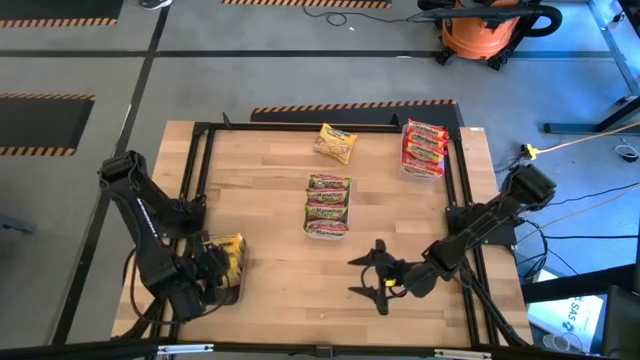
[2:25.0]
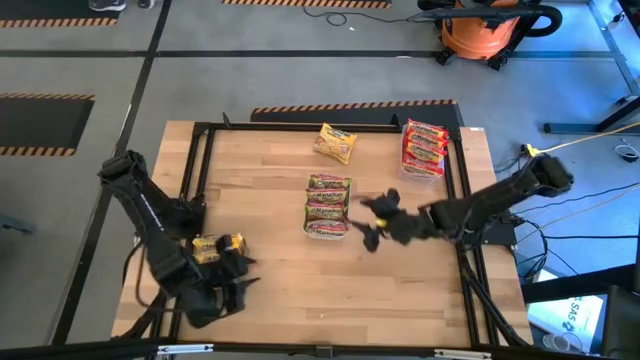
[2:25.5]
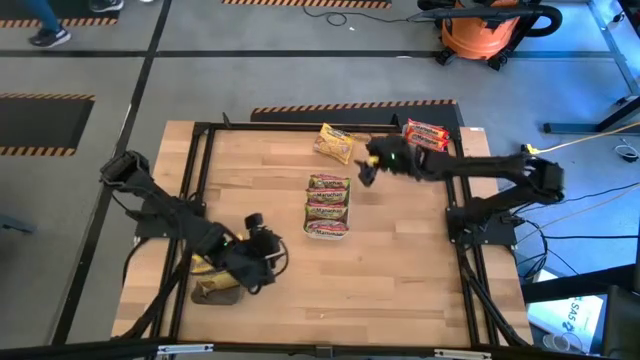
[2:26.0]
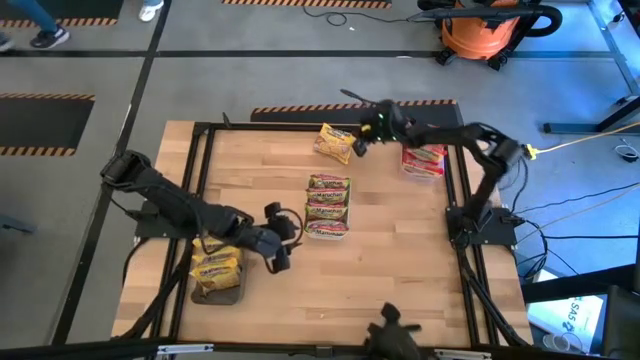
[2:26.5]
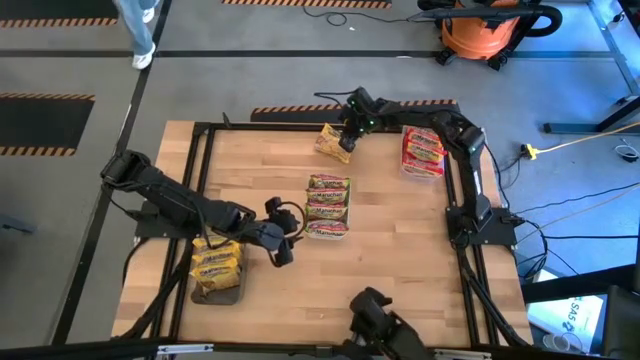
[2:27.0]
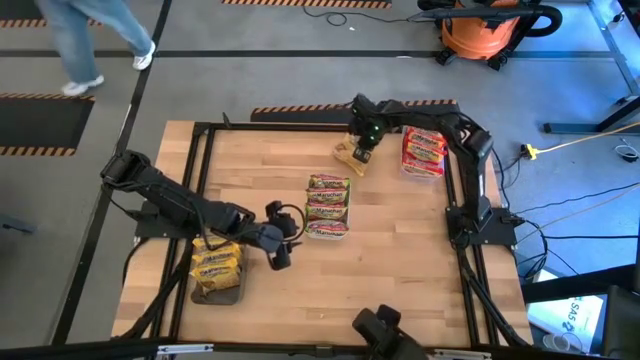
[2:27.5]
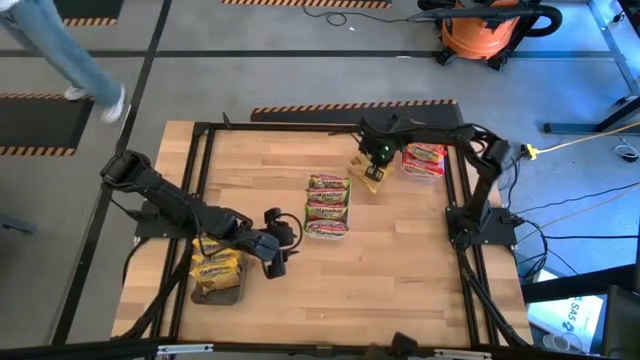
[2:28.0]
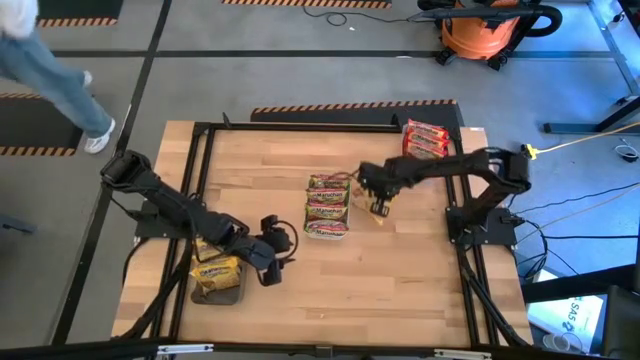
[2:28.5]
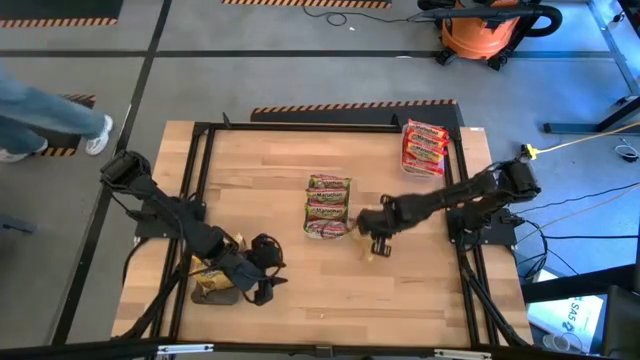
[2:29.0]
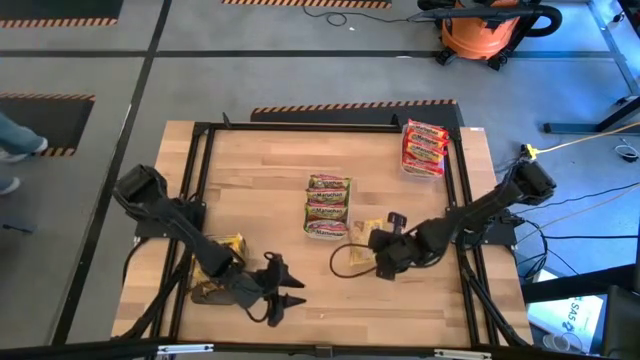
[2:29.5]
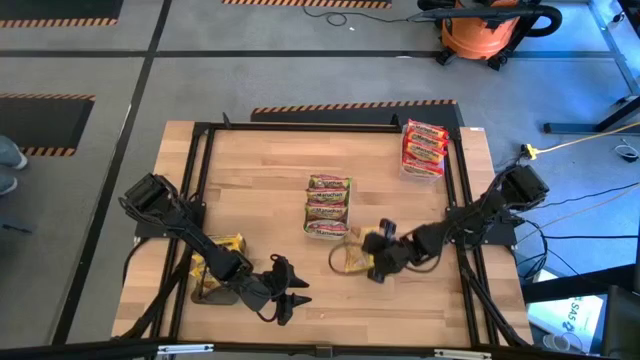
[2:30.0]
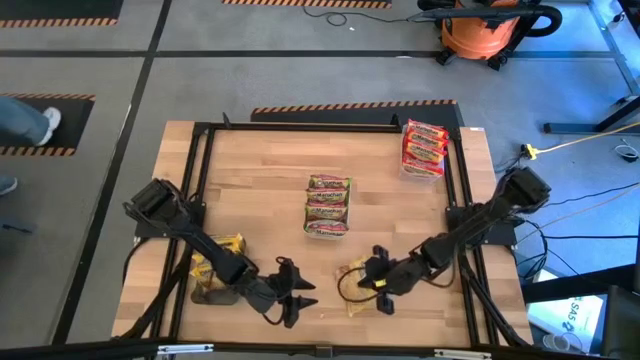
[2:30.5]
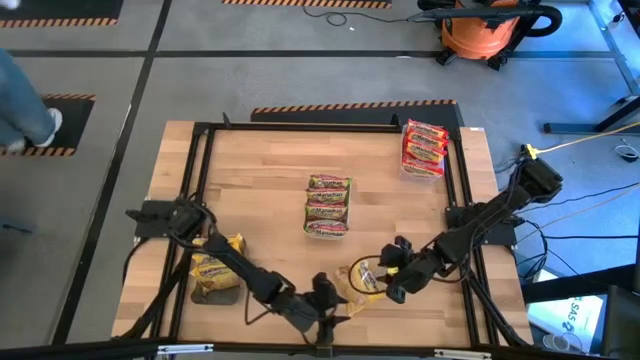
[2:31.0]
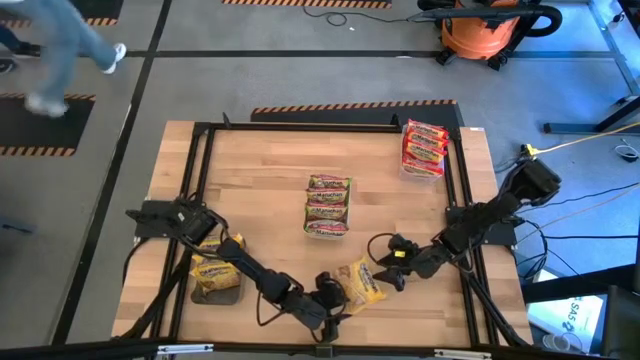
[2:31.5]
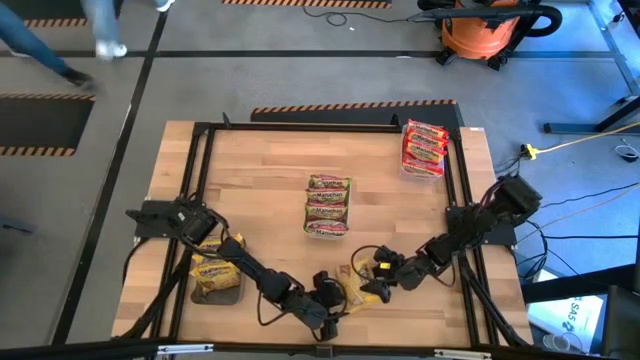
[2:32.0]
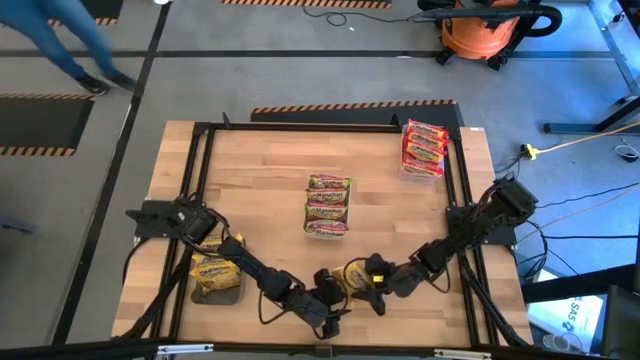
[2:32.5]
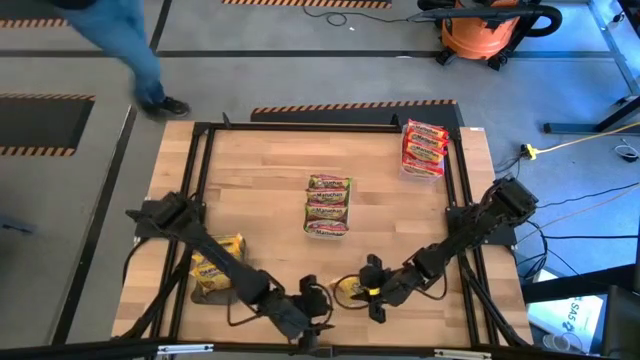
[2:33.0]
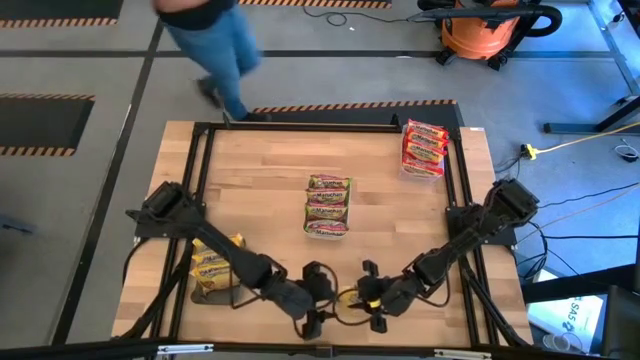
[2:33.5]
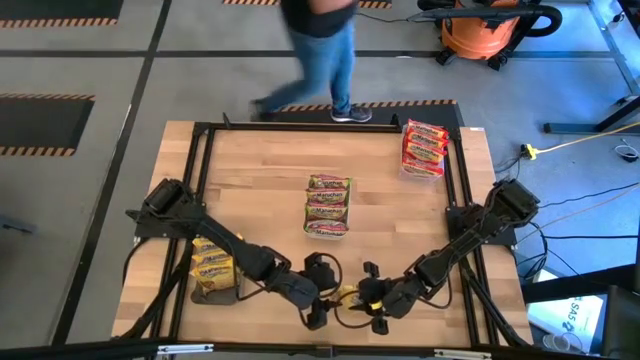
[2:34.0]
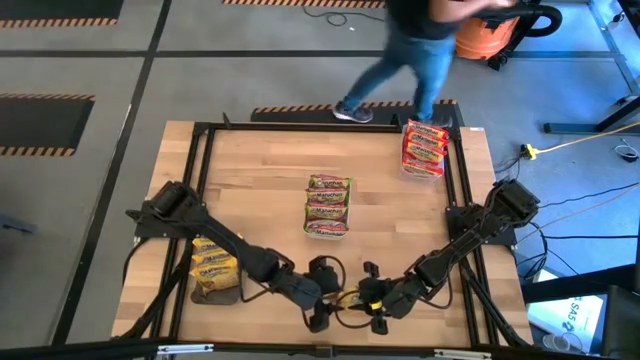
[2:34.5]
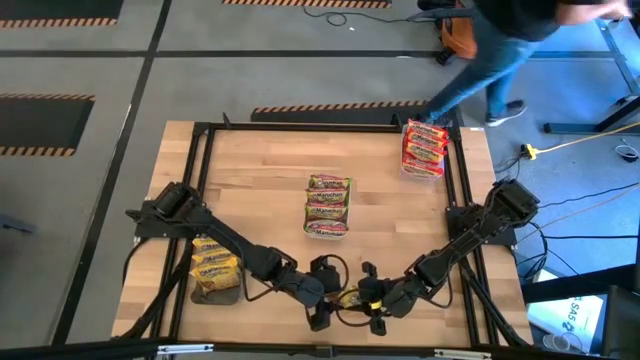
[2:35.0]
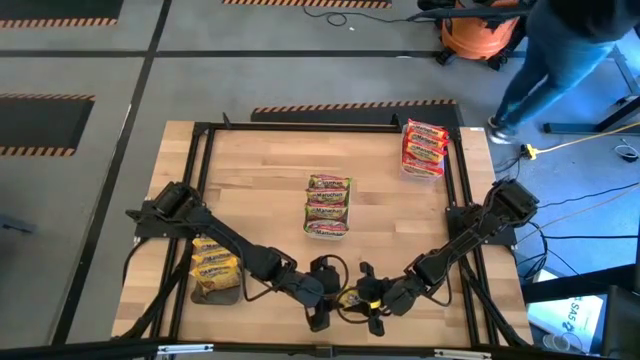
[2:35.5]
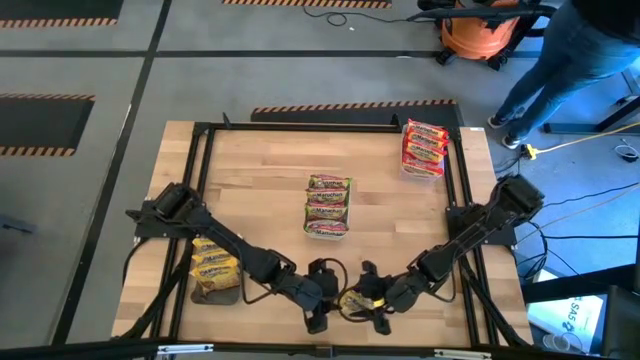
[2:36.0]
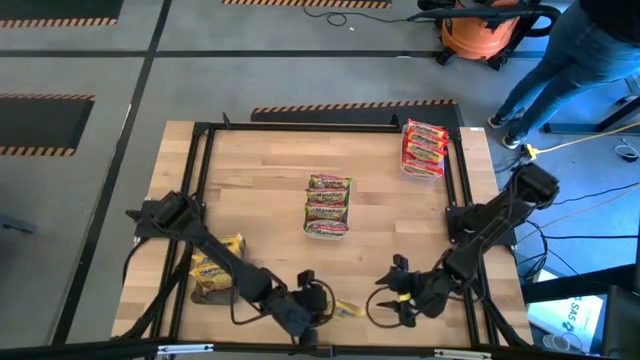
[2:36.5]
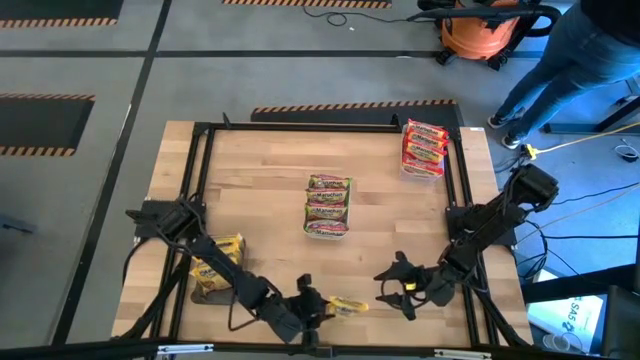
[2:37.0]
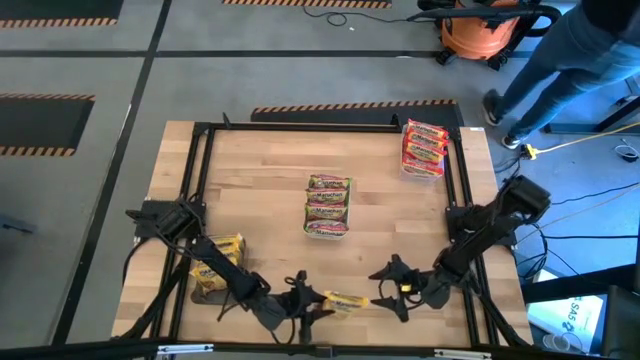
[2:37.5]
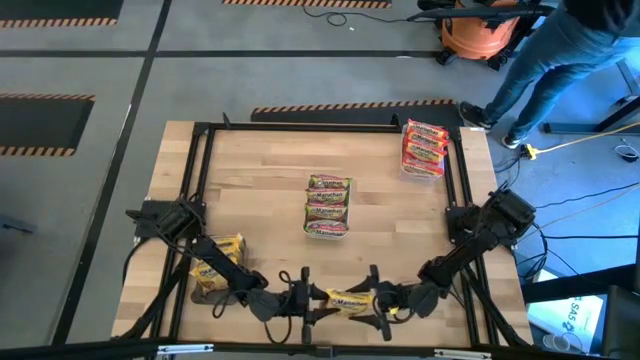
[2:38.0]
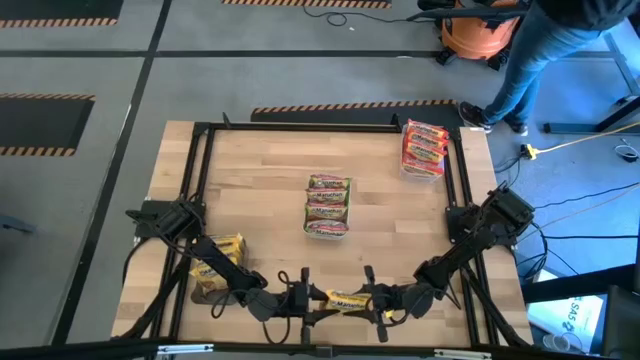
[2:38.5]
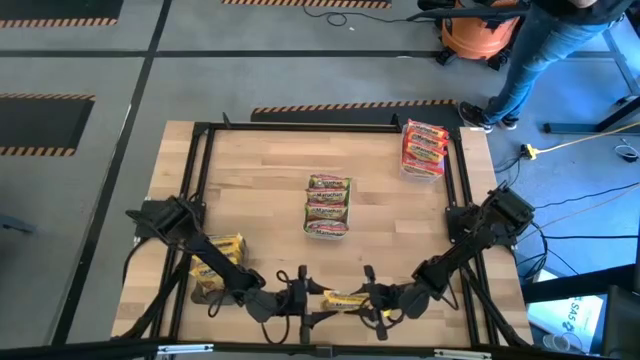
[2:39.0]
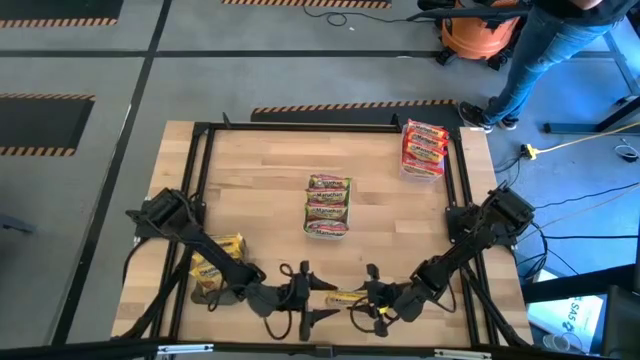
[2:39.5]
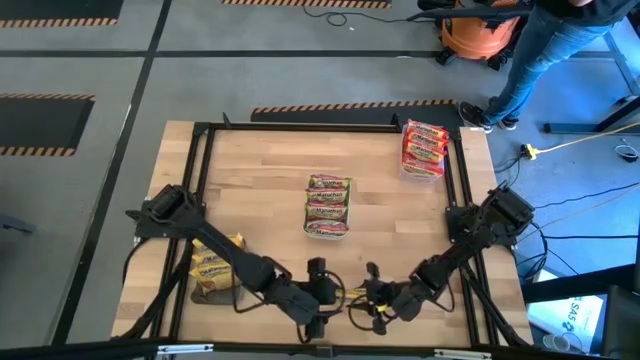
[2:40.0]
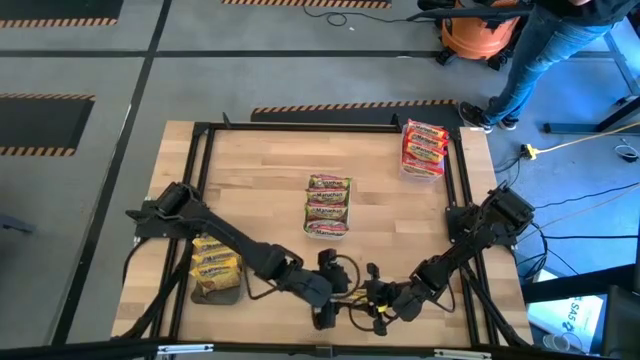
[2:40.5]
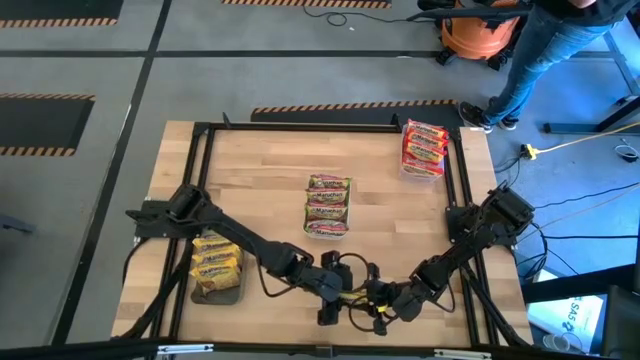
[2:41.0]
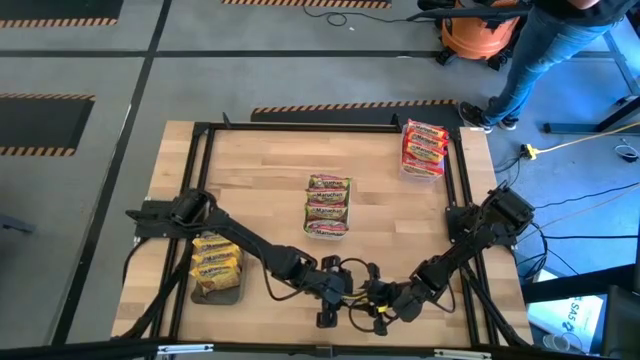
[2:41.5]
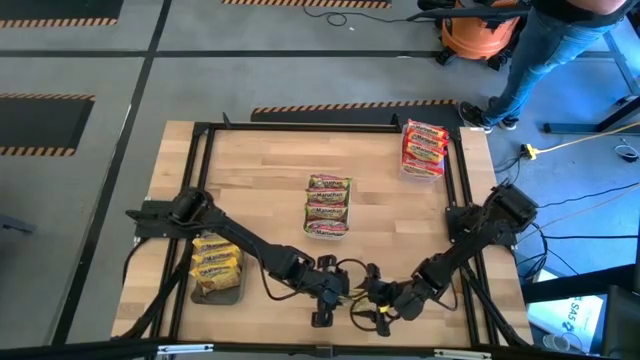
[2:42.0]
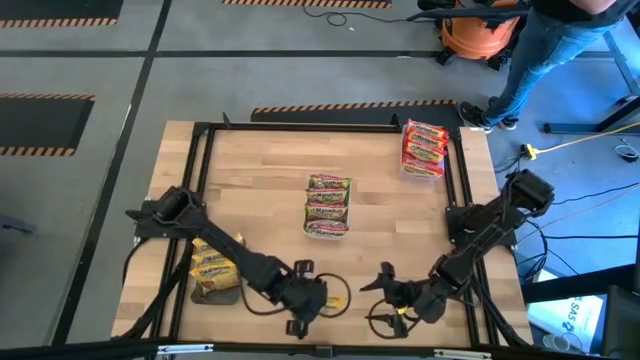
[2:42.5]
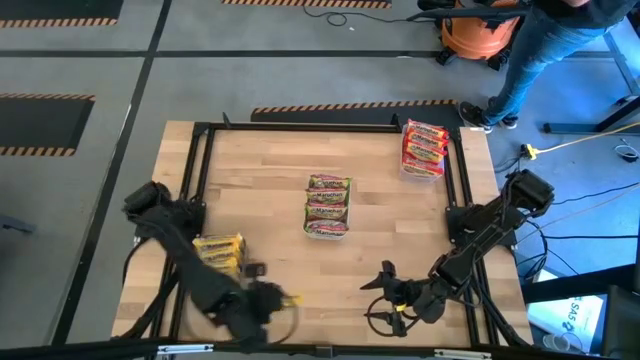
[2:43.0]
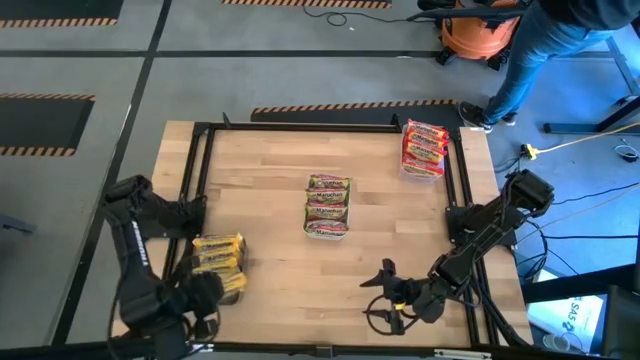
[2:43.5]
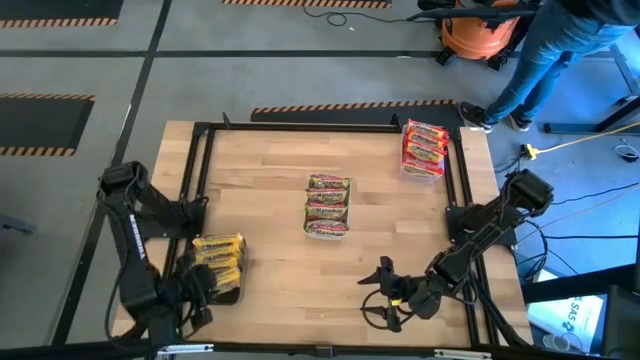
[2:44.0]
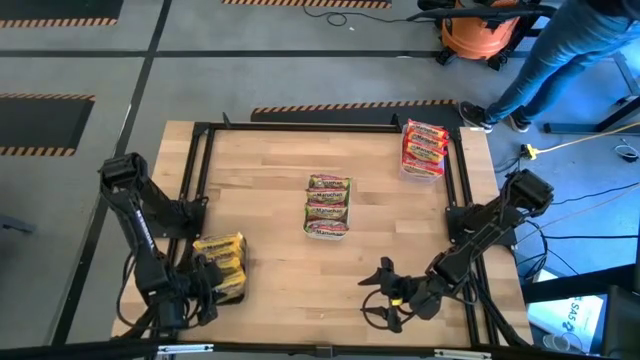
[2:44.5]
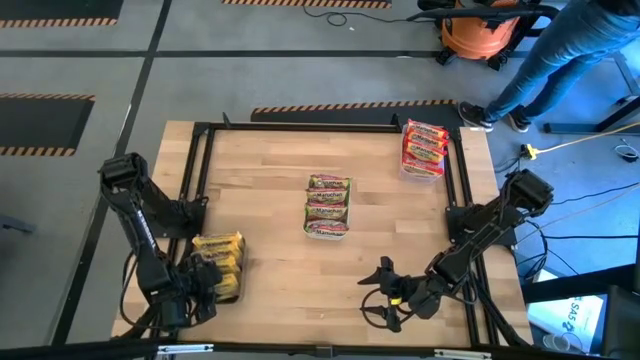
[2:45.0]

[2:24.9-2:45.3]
Task: Sort Maruchan noodles
Put the yellow noodle pack into the black bin

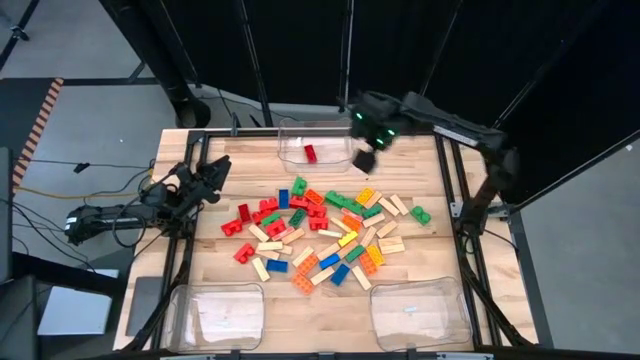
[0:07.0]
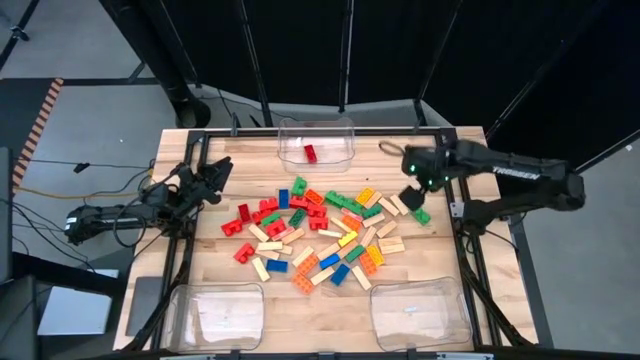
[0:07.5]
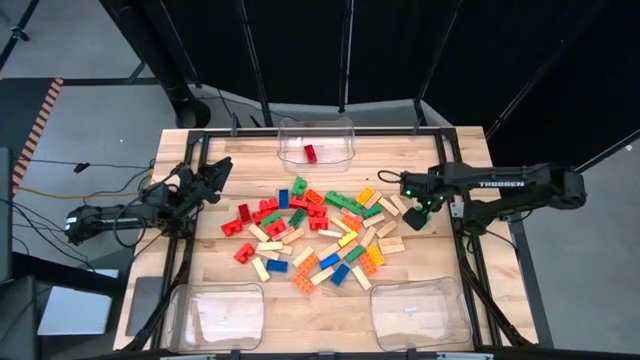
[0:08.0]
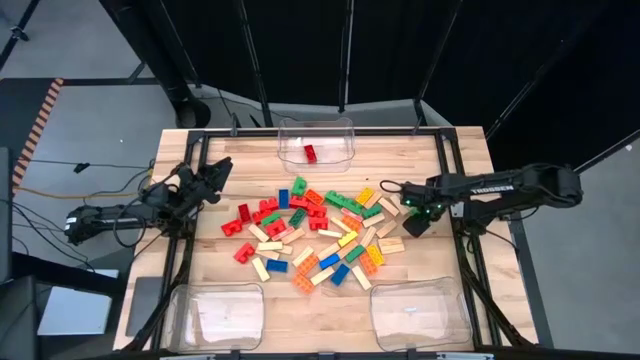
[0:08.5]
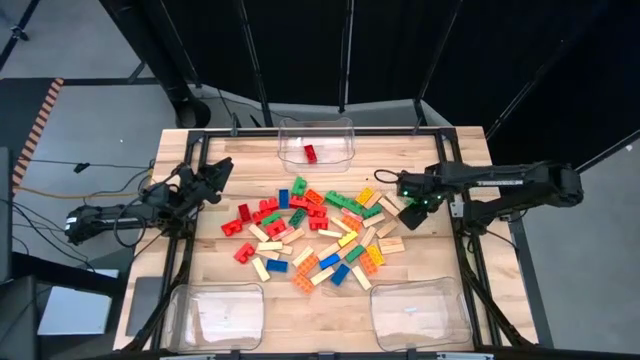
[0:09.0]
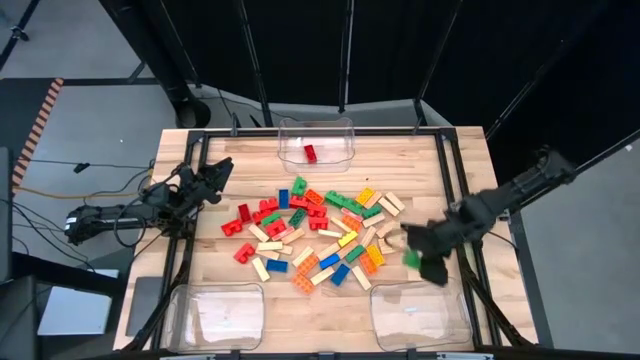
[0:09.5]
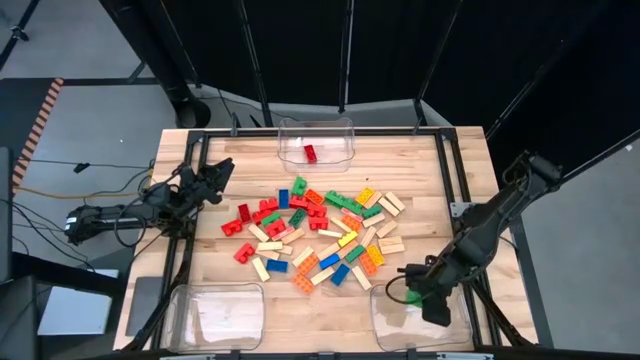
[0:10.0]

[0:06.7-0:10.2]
Task: Sort blocks by size
Put the 2-stud green game piece into the bottom right transparent bin
